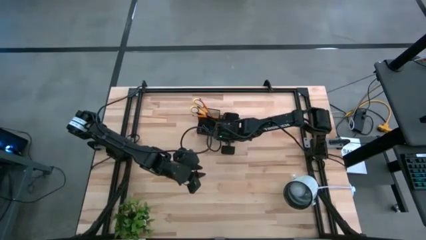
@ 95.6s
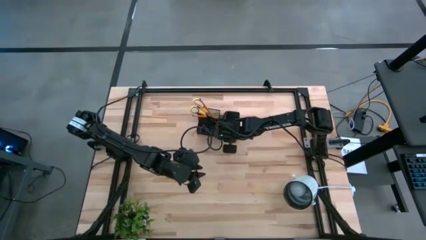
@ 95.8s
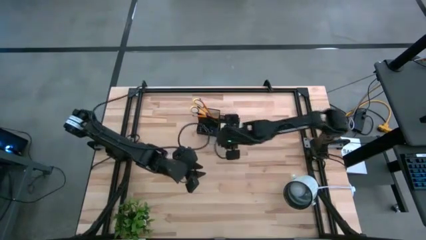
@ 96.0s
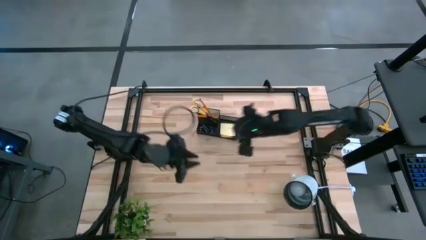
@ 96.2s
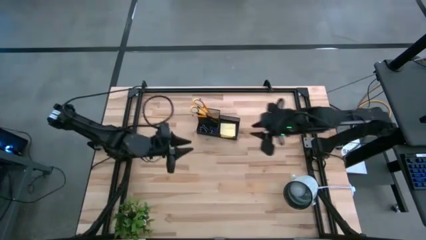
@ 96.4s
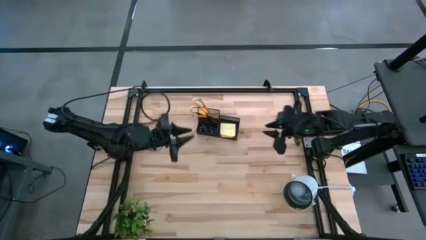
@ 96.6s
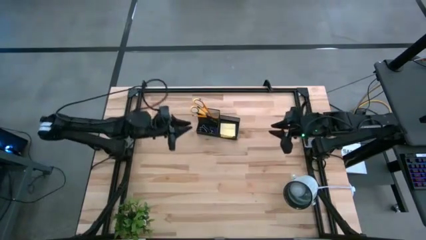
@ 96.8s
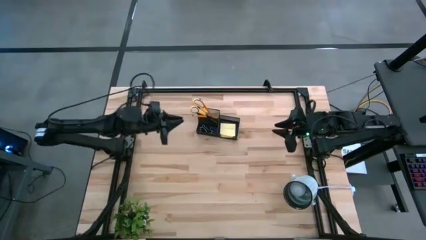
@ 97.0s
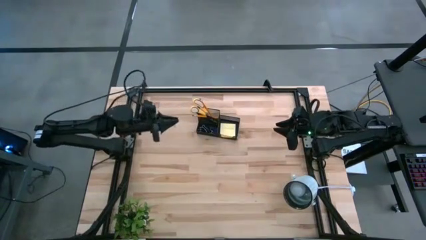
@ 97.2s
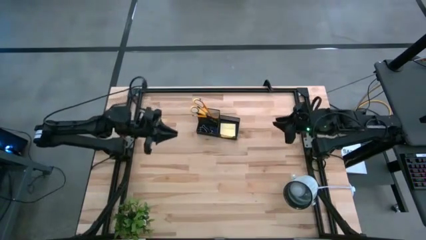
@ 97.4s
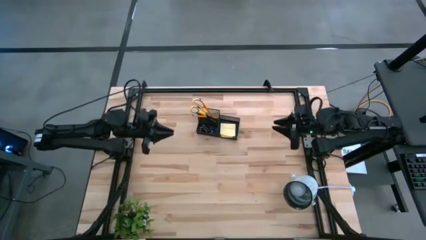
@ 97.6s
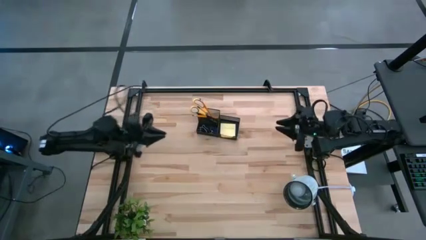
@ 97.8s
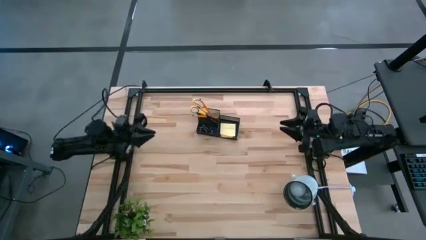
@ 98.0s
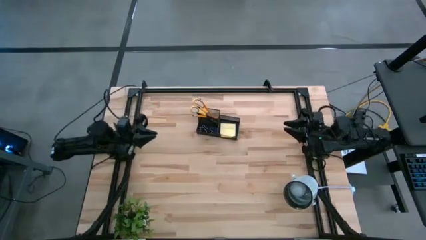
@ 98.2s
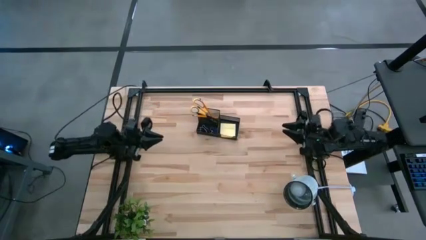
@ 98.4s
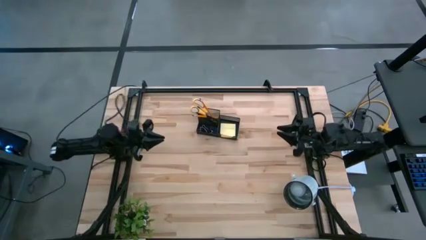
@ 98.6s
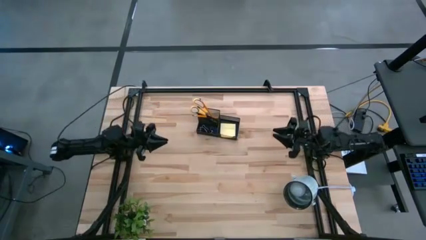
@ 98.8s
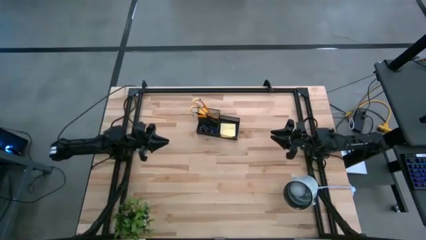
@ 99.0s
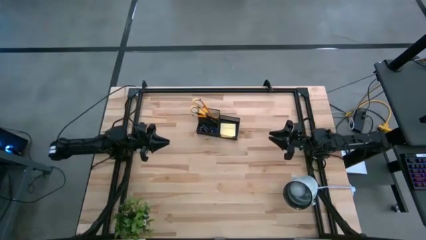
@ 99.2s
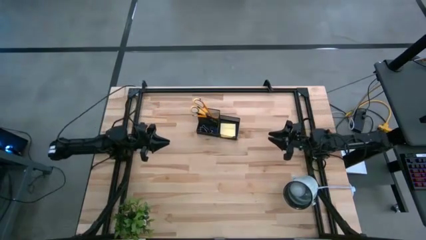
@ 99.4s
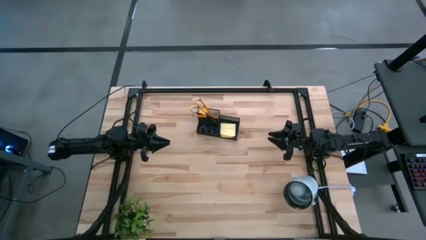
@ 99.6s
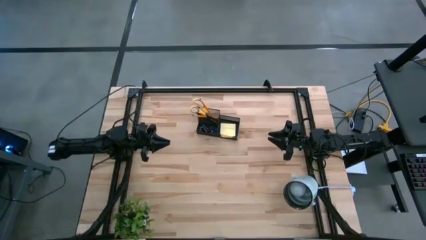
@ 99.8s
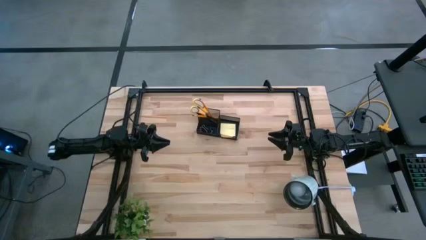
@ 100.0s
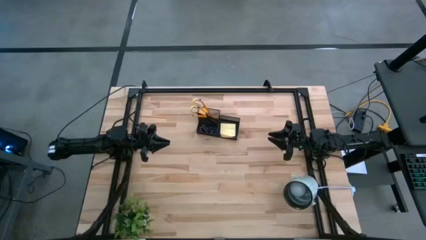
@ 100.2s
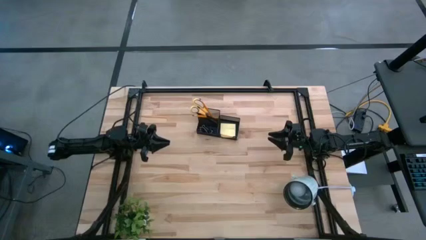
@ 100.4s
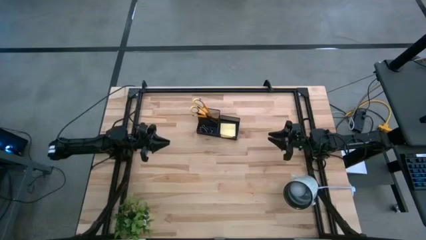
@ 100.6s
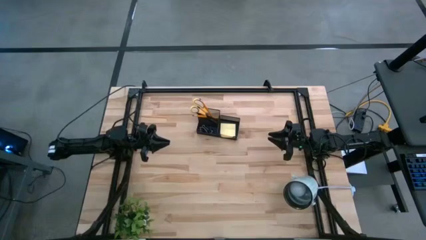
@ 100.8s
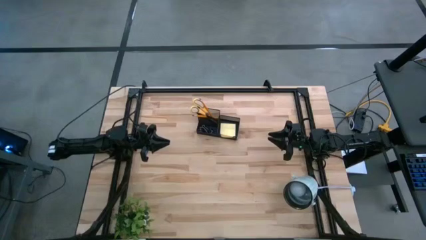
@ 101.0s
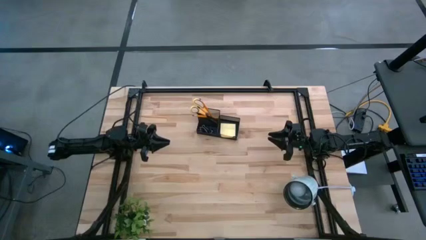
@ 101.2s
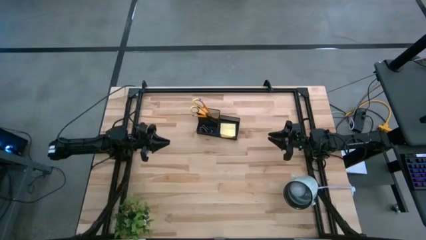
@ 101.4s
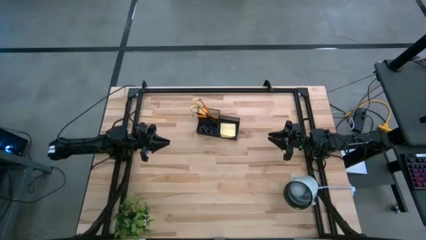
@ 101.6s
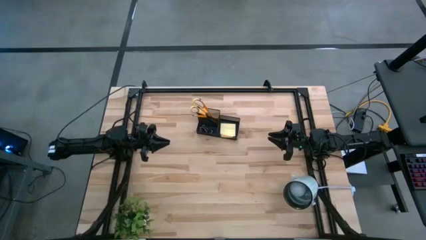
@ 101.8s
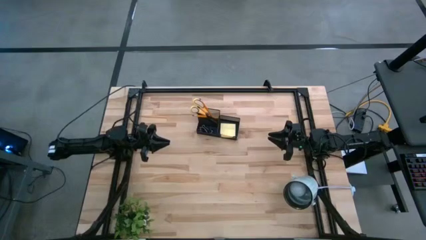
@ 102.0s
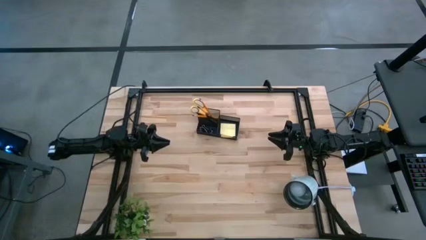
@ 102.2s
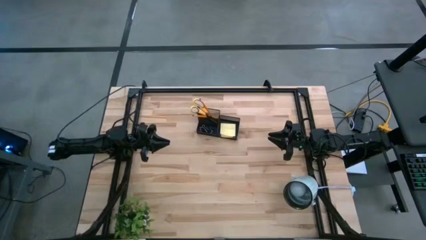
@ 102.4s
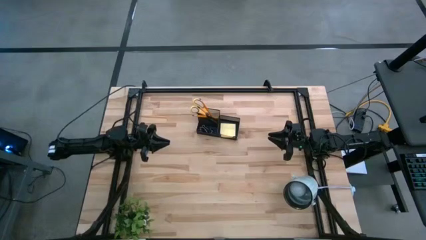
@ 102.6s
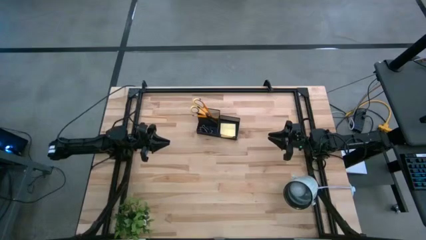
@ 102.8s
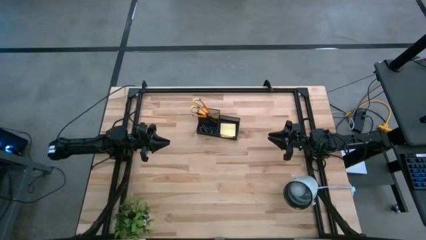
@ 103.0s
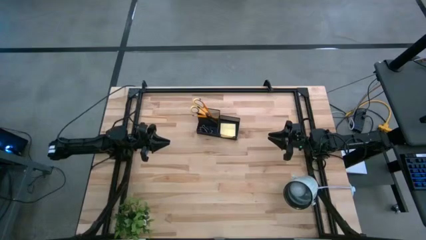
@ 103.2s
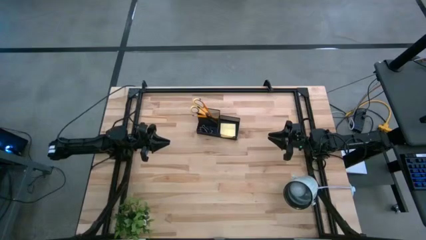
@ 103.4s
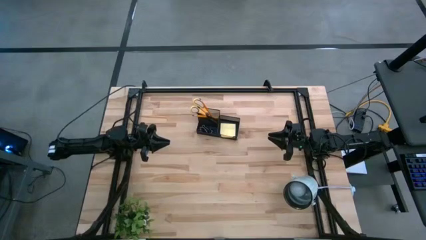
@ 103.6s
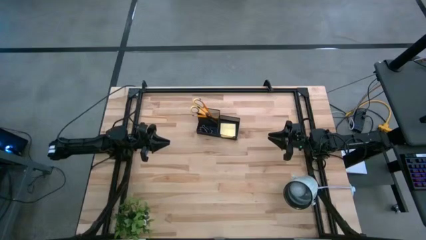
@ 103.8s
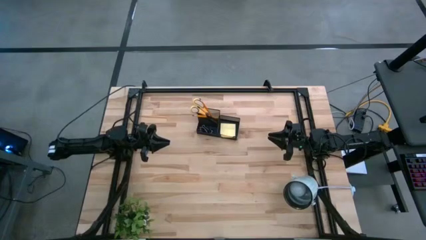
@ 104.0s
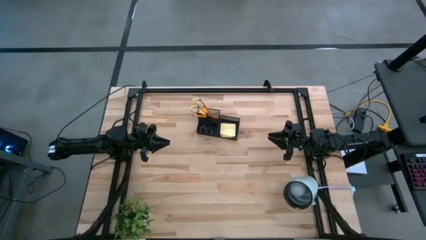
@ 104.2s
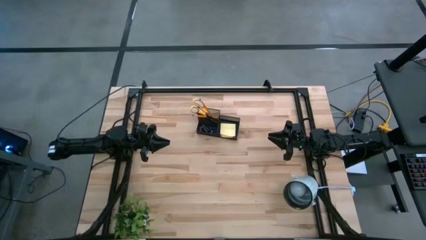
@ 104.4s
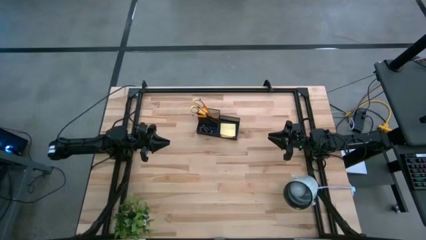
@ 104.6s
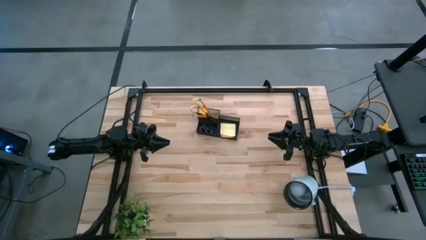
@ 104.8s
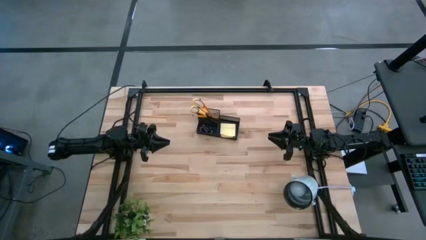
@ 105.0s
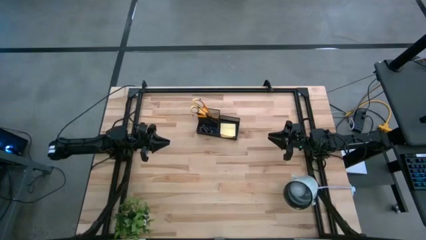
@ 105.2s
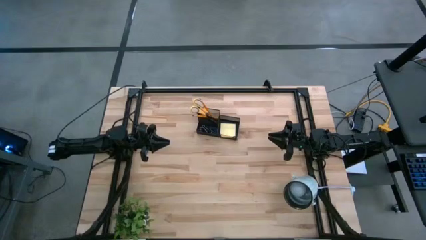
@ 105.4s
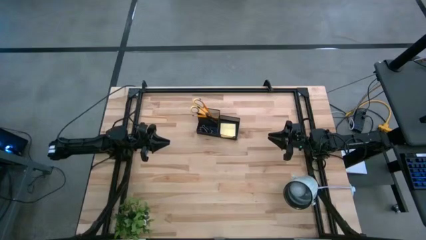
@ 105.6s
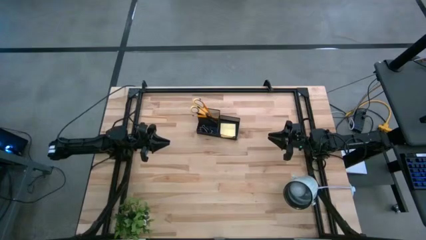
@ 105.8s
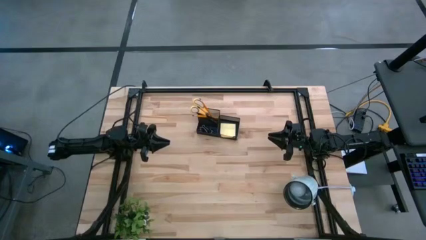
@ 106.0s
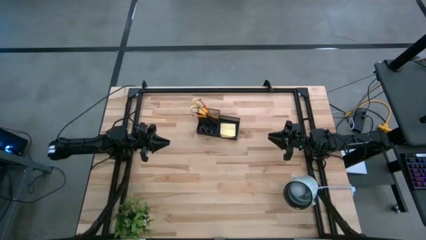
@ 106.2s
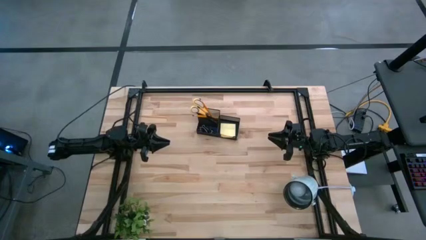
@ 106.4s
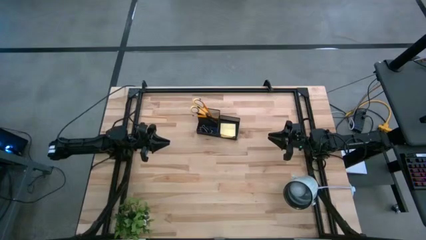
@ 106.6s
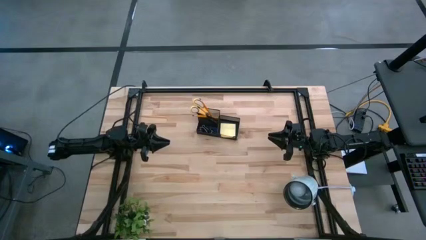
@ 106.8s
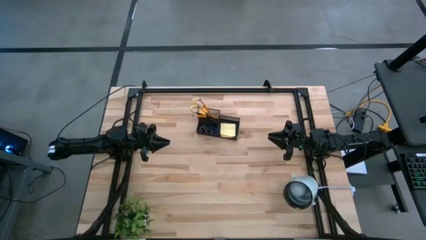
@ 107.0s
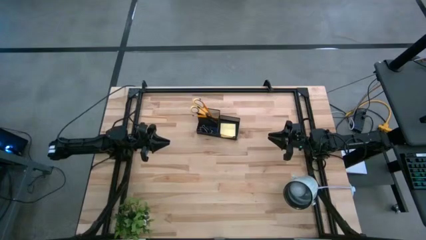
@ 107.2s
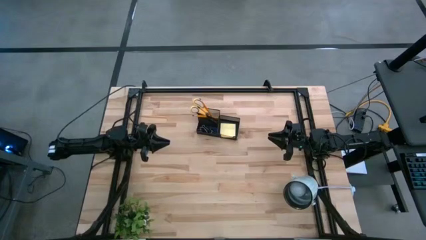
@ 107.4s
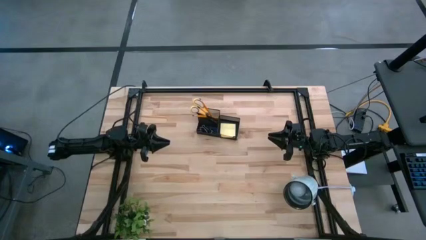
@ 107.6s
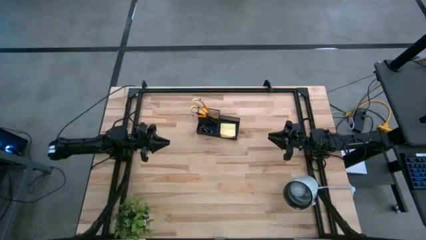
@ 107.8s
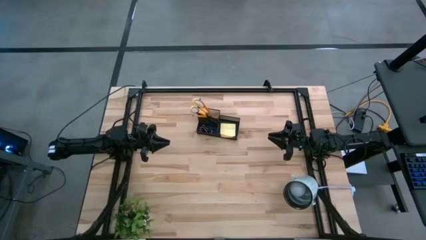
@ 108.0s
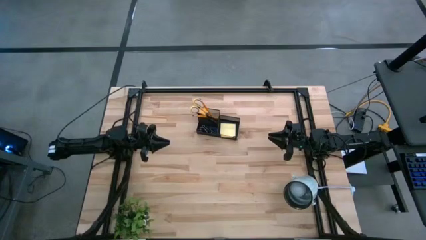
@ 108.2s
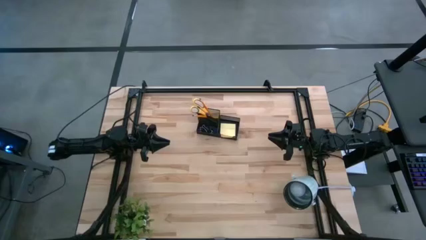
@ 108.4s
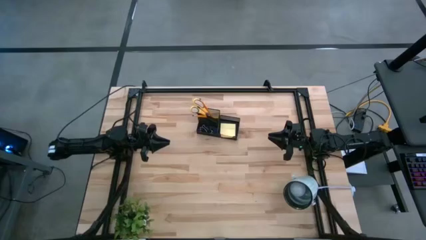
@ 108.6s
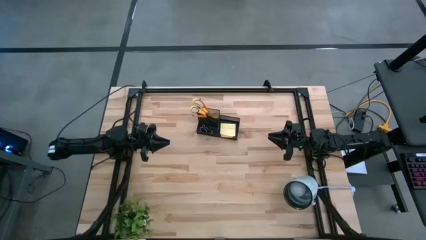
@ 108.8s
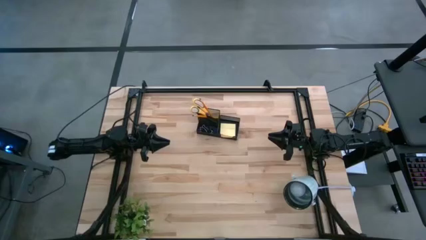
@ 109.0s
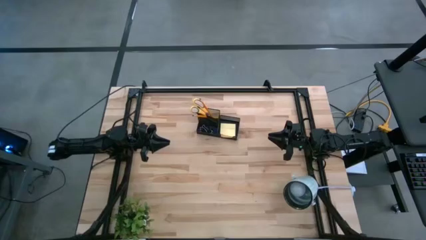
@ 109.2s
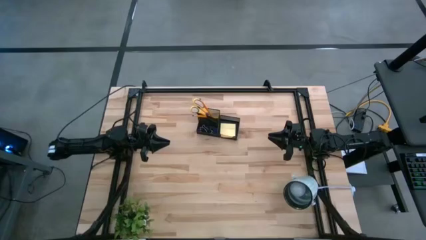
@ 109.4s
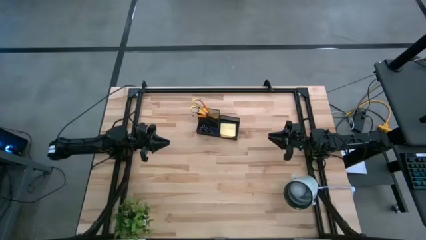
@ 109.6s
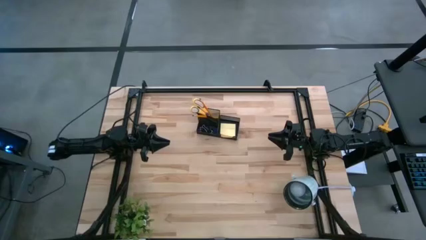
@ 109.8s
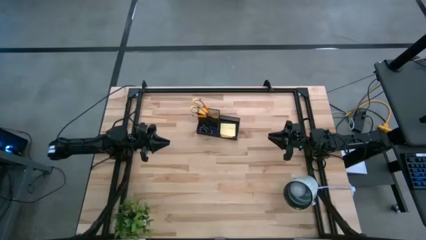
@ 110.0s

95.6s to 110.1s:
Task: Pick and place office supplies into organizer
Return to Home Position
